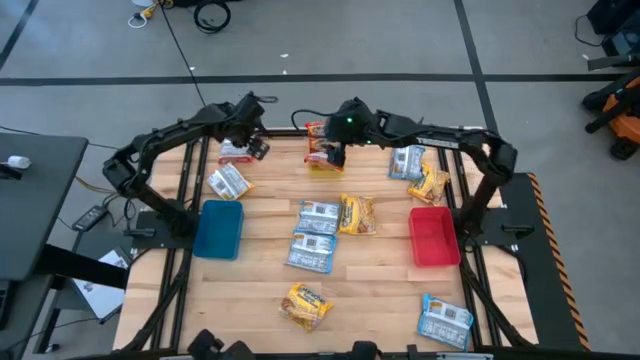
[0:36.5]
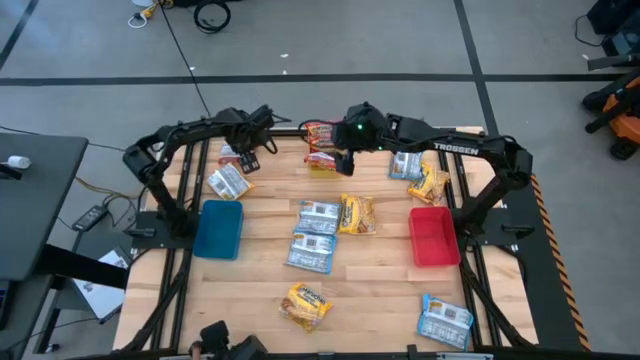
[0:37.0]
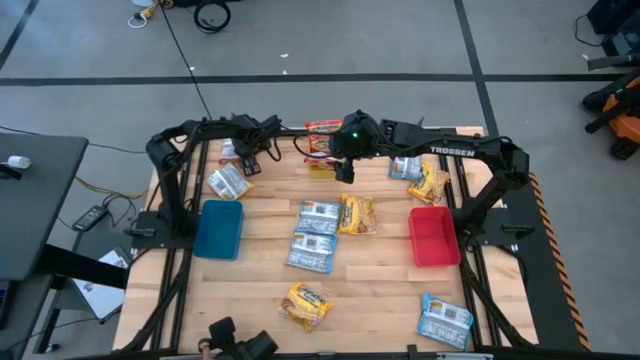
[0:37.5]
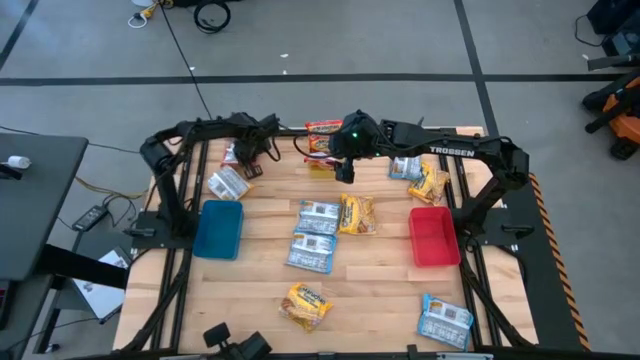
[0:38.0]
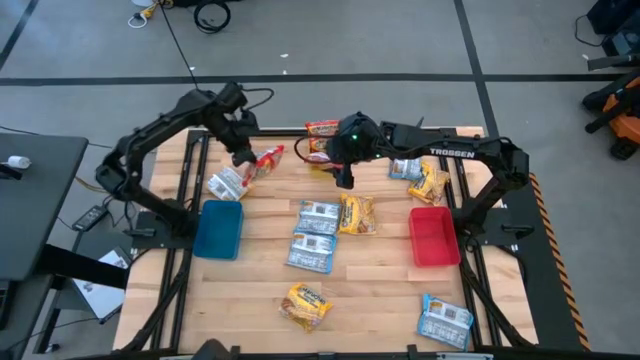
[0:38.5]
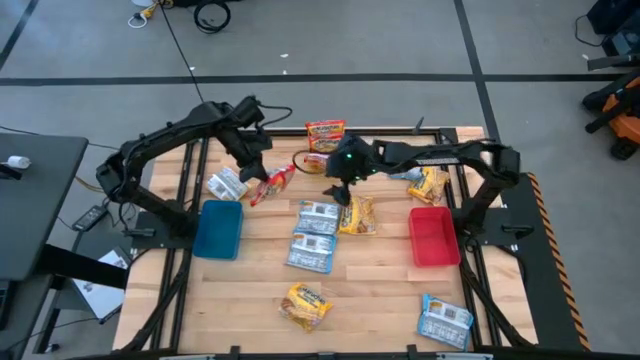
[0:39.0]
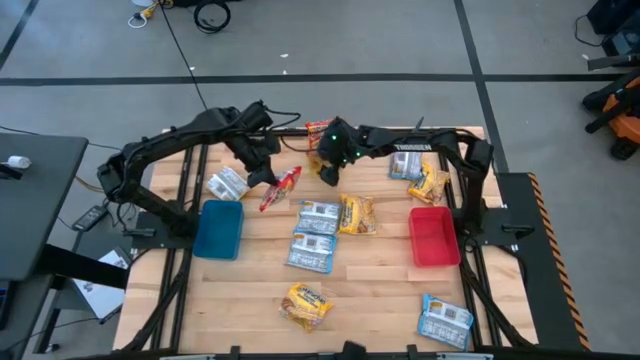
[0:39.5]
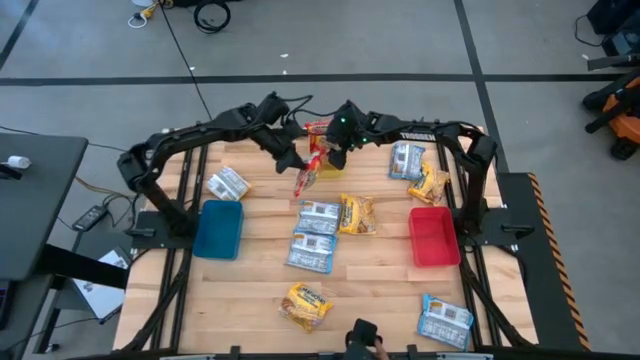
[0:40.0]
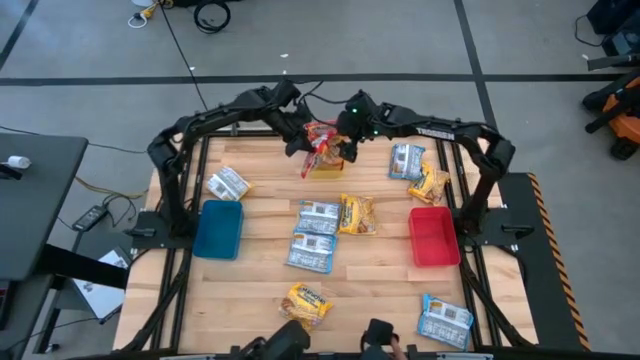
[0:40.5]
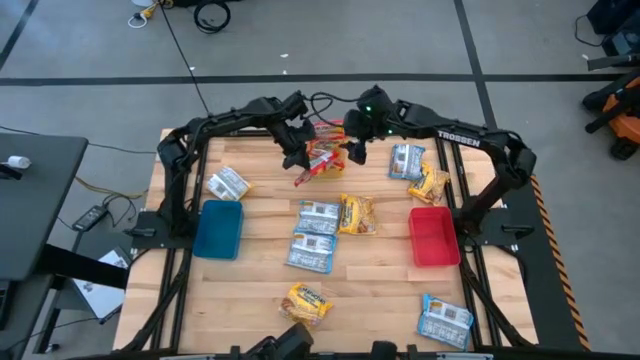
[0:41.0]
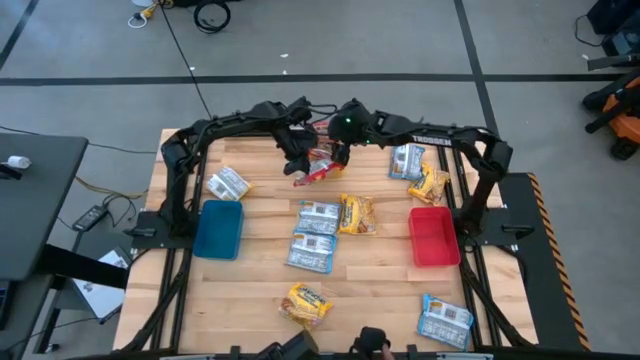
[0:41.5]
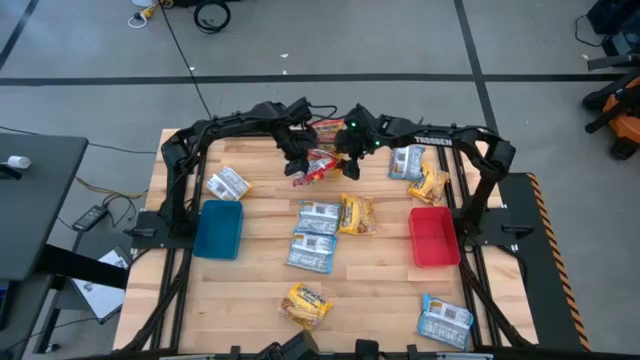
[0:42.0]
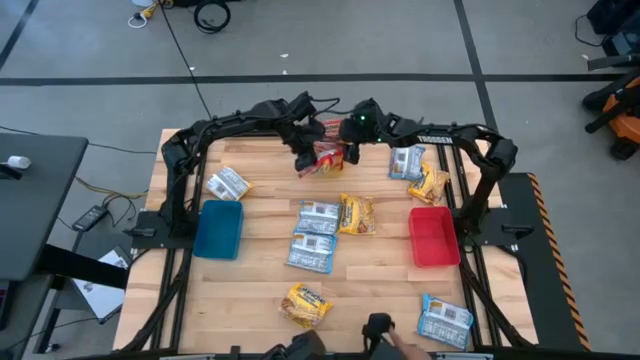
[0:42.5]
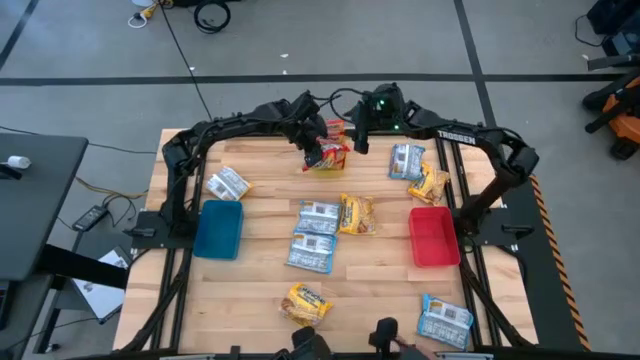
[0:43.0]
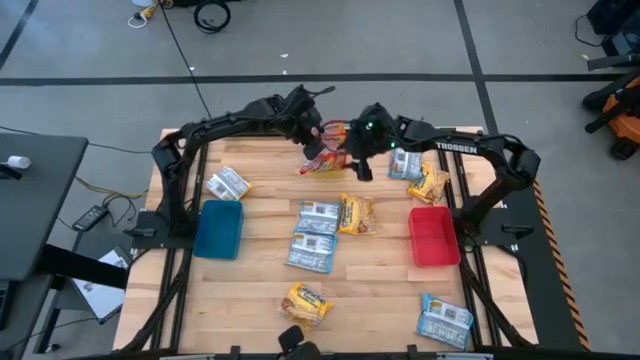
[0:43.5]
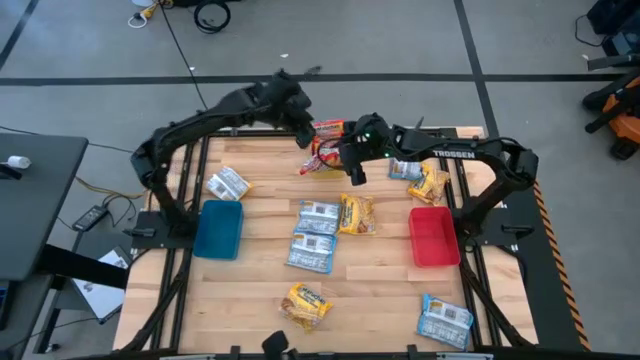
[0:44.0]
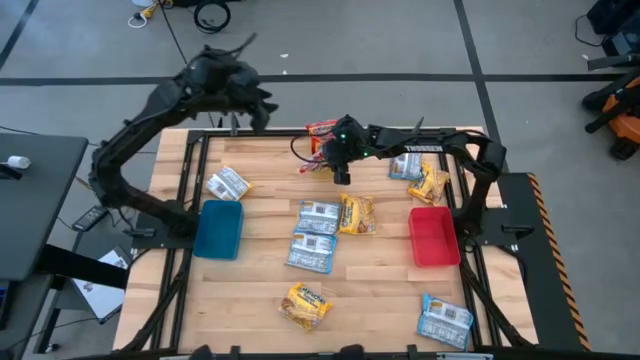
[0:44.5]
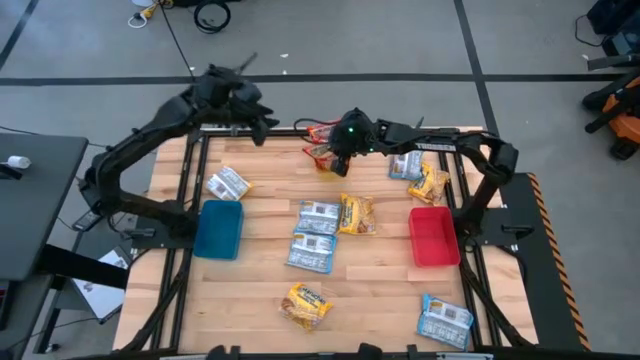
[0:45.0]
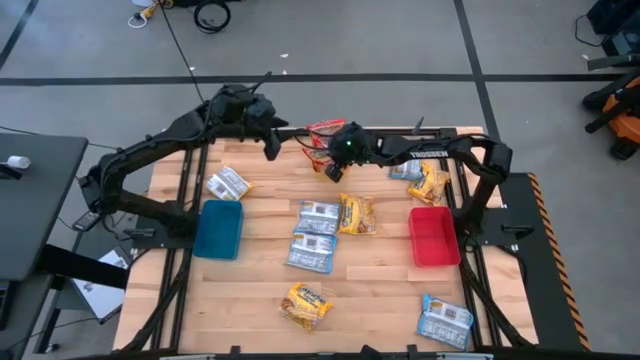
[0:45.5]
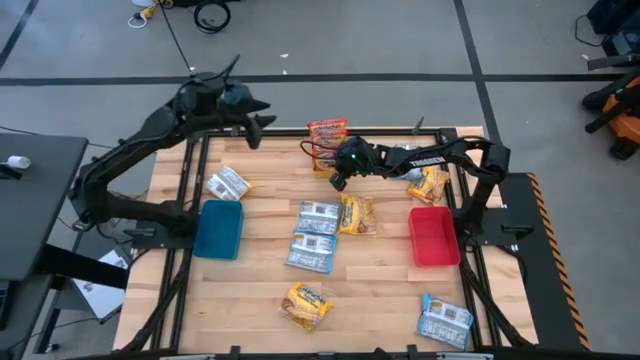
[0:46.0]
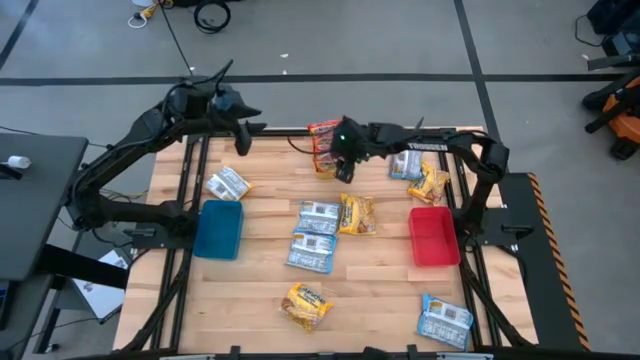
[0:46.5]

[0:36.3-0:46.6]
Task: Sort Maruchan noodles
Put the red noodle pack into the yellow bin

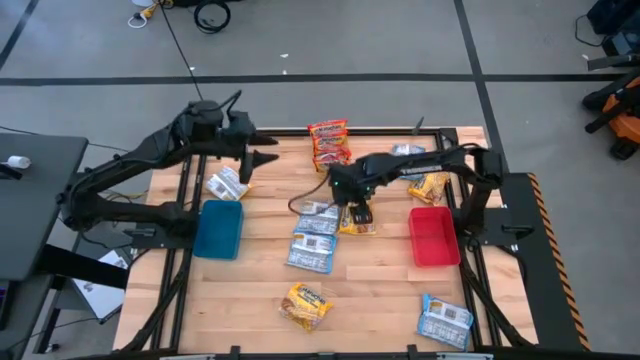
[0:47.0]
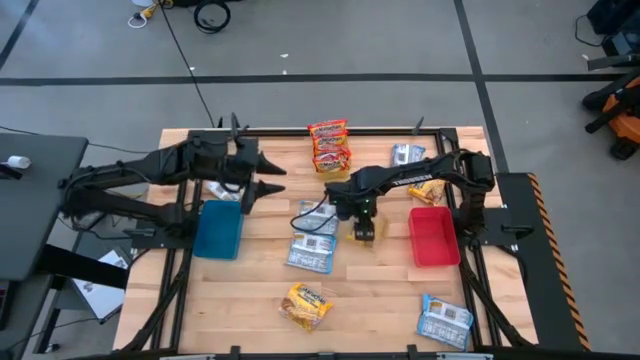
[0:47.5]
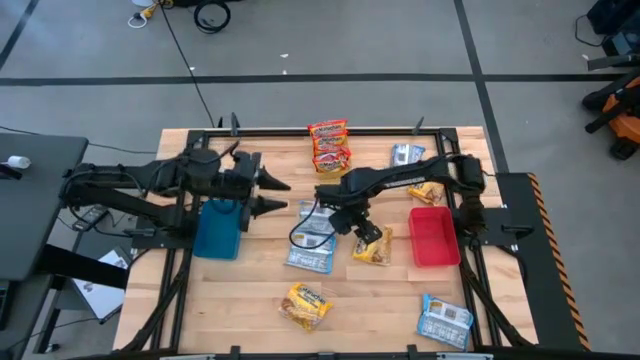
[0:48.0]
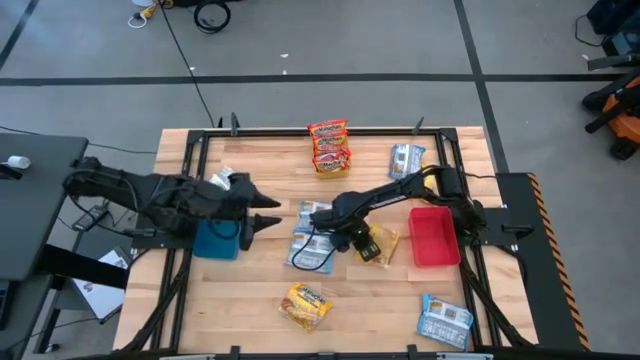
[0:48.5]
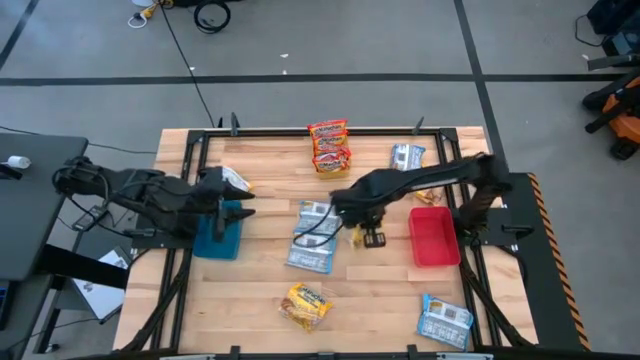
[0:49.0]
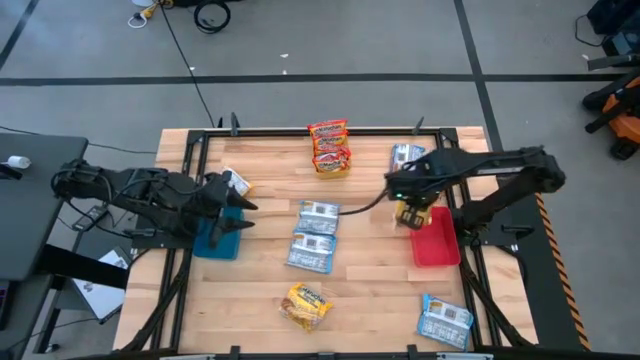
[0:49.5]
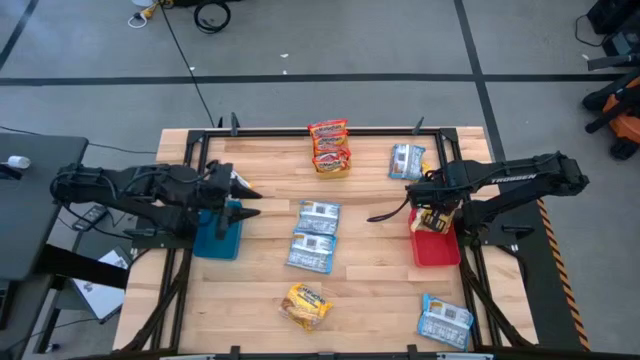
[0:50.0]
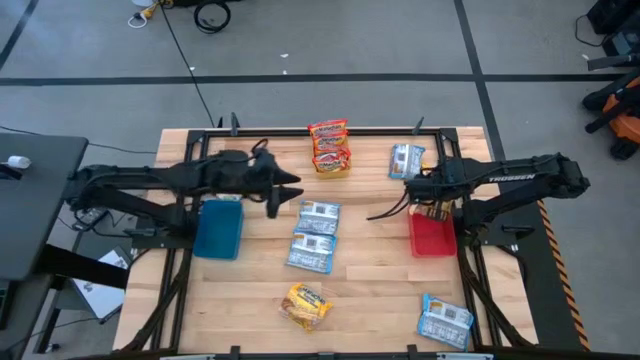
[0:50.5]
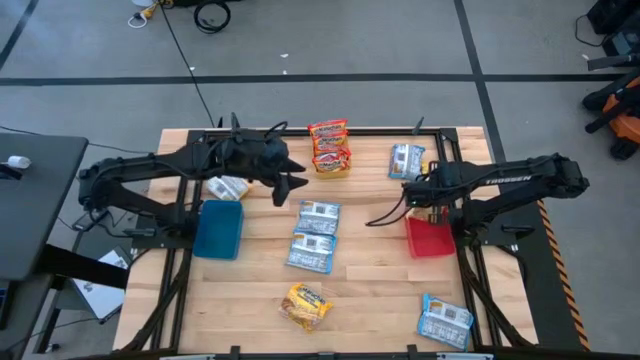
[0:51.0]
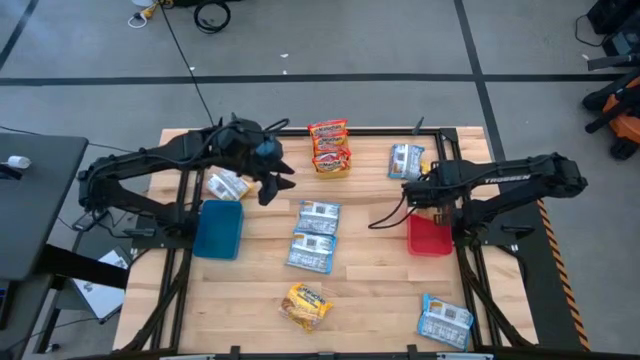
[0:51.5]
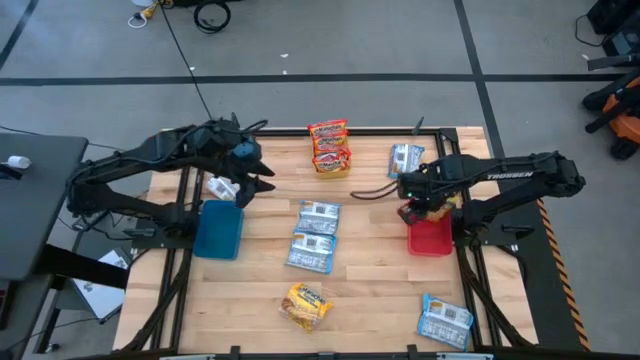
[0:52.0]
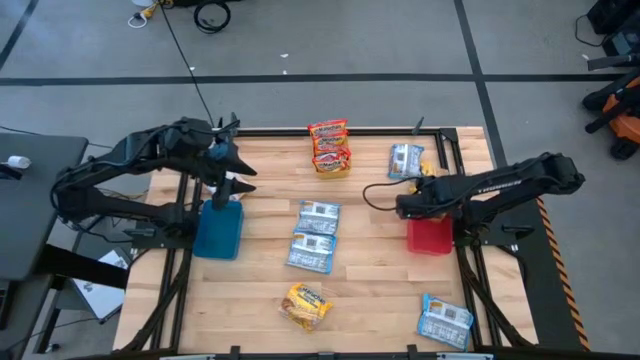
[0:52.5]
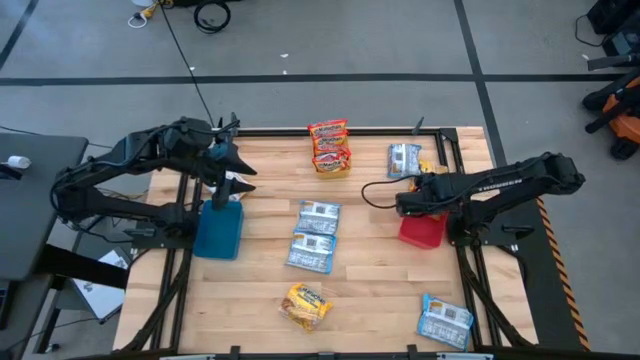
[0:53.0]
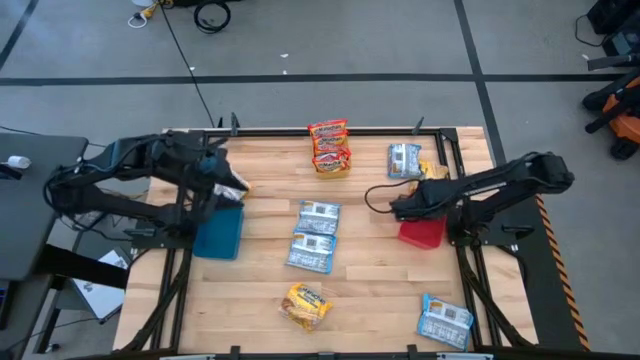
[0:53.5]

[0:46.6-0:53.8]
Put the top center yellow noodle pack into the red bin

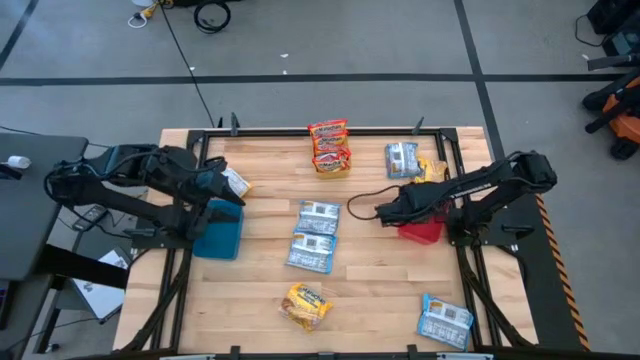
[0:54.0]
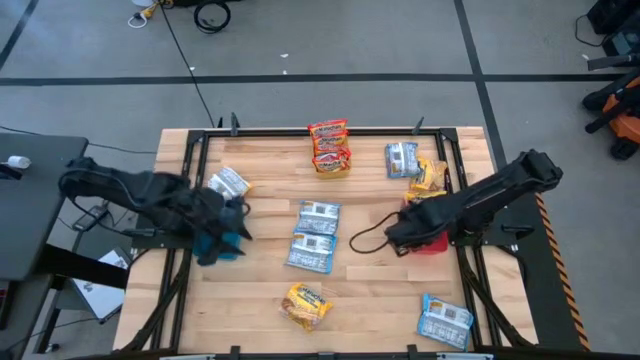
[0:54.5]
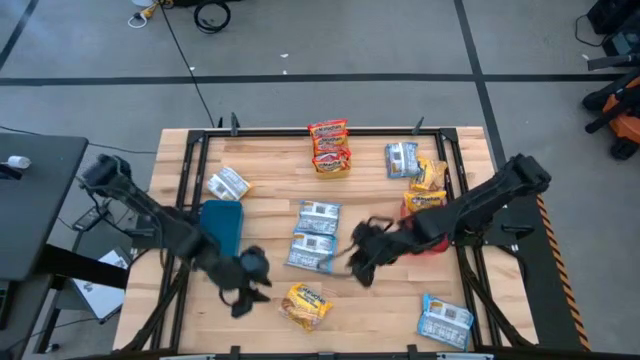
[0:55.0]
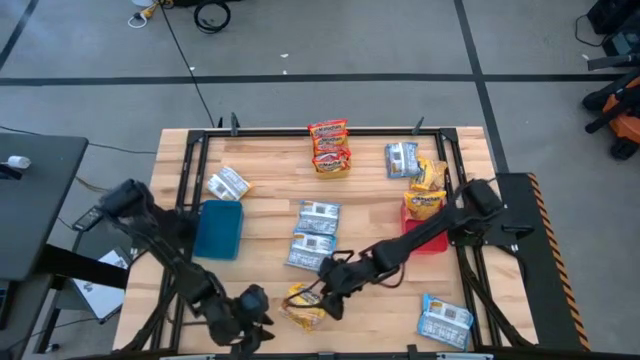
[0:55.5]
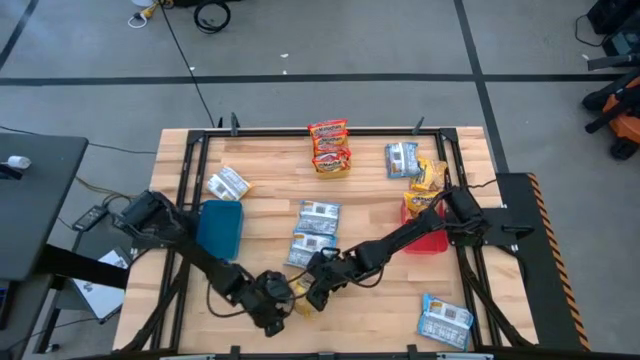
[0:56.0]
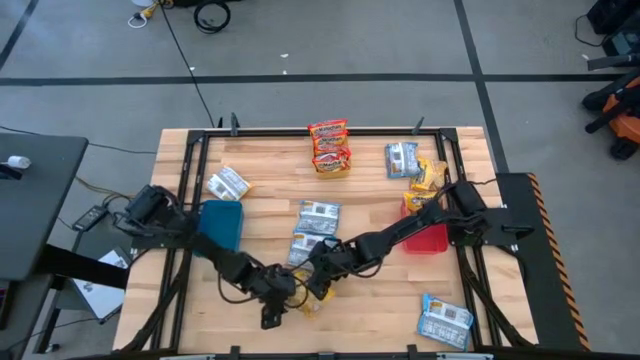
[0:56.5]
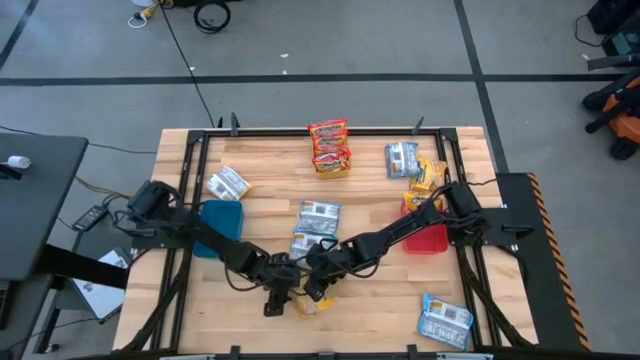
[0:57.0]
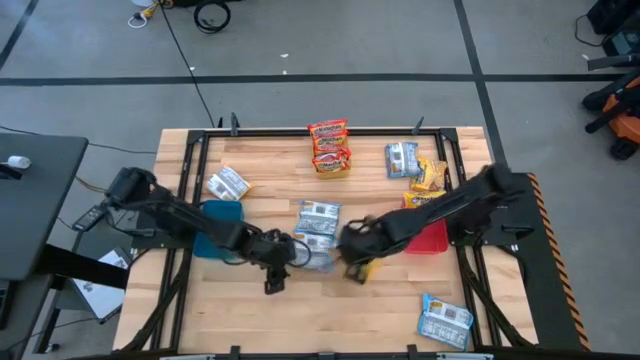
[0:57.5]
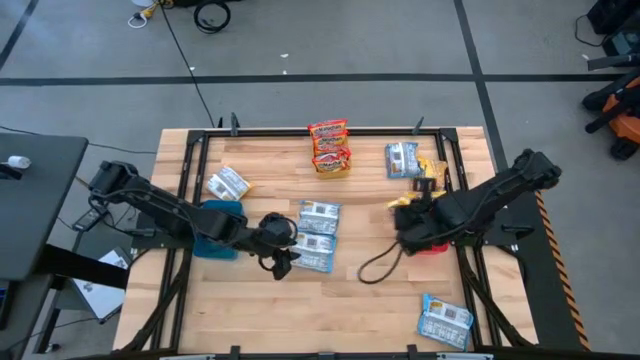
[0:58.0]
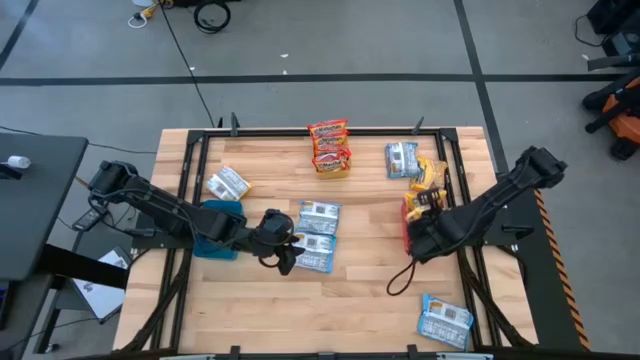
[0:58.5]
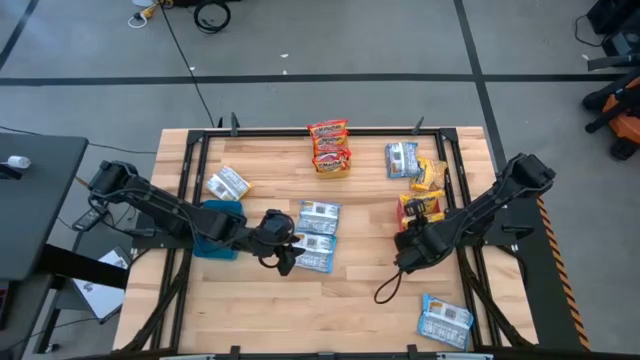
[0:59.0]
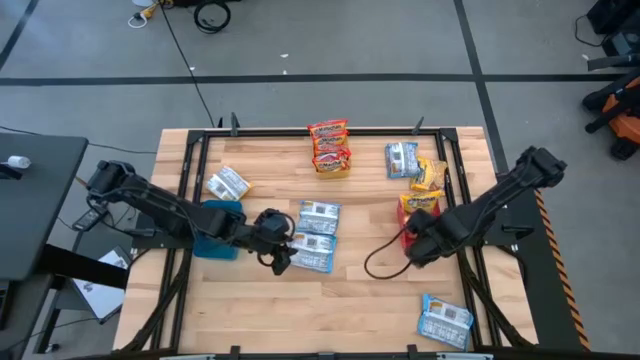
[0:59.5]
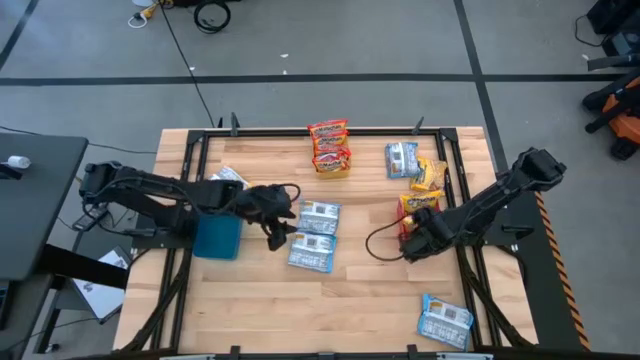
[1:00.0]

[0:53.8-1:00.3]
Put the bottom yellow noodle pack into the red bin
